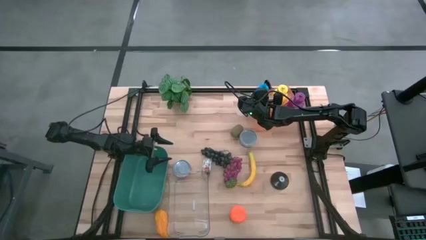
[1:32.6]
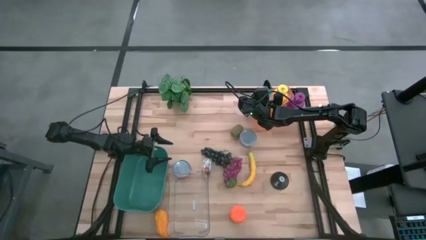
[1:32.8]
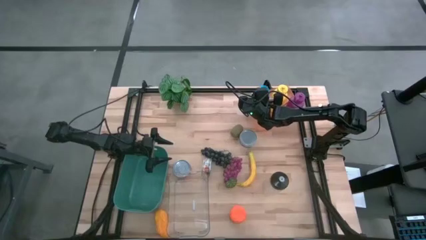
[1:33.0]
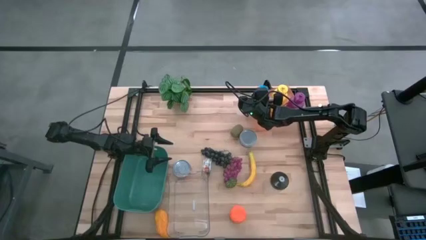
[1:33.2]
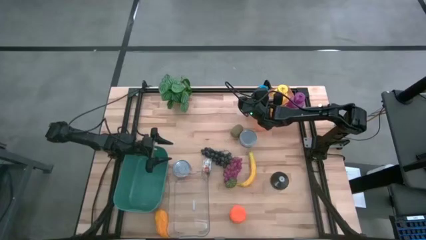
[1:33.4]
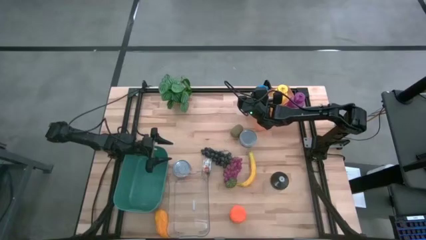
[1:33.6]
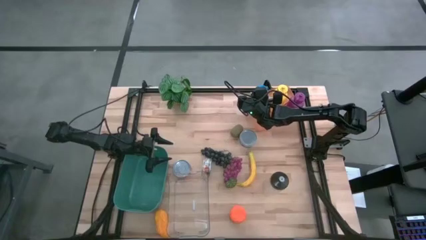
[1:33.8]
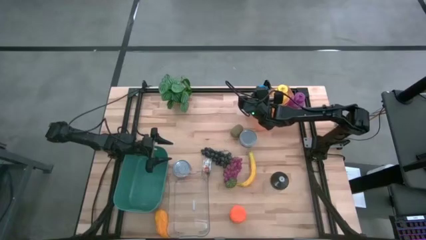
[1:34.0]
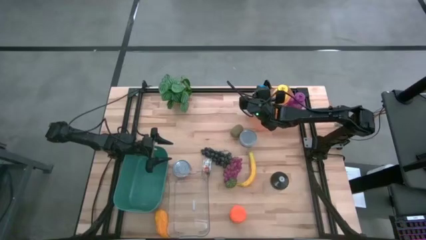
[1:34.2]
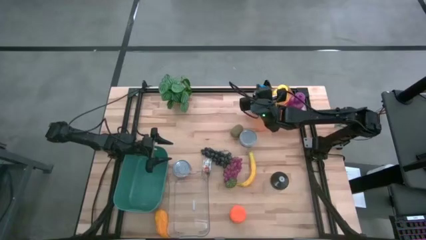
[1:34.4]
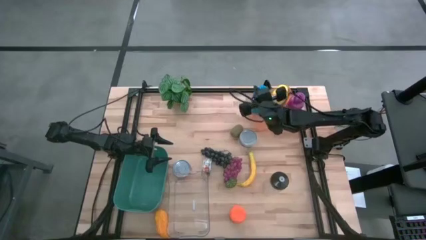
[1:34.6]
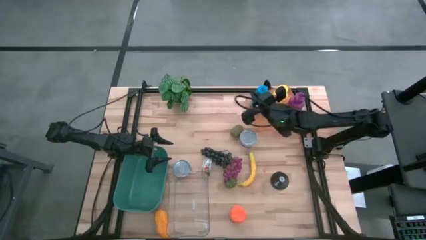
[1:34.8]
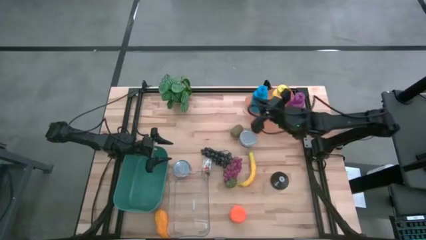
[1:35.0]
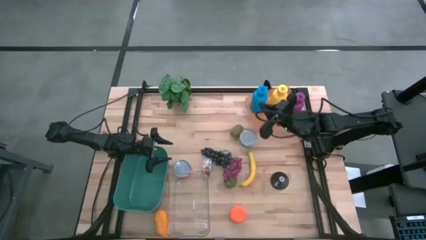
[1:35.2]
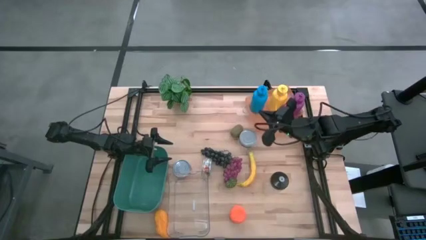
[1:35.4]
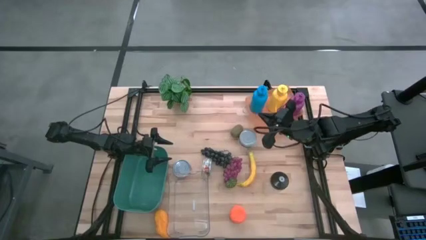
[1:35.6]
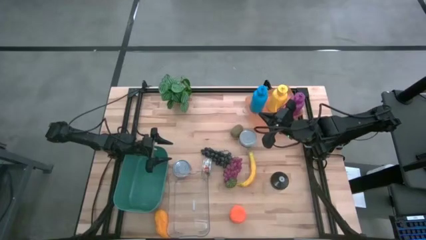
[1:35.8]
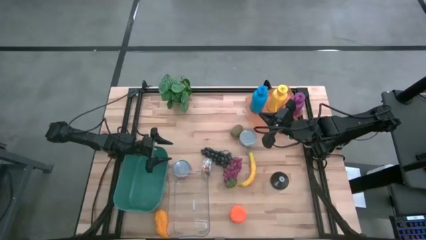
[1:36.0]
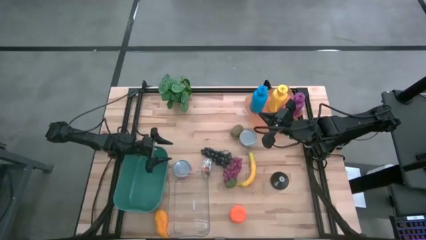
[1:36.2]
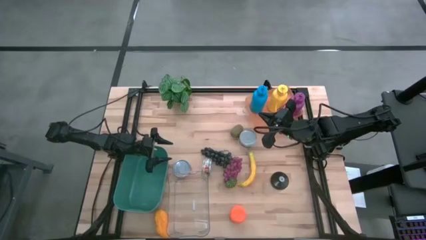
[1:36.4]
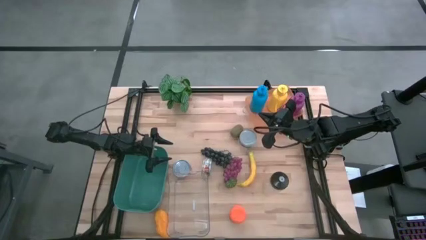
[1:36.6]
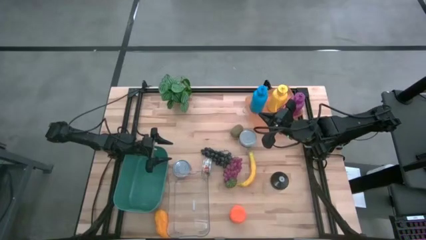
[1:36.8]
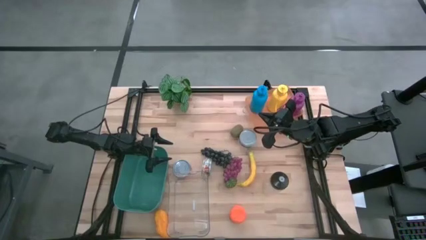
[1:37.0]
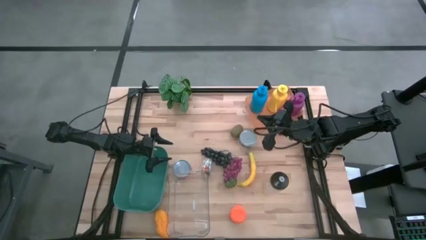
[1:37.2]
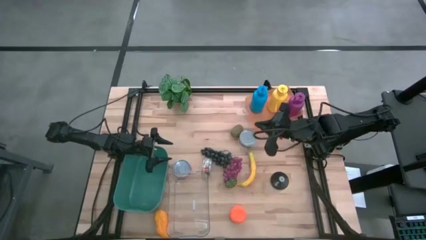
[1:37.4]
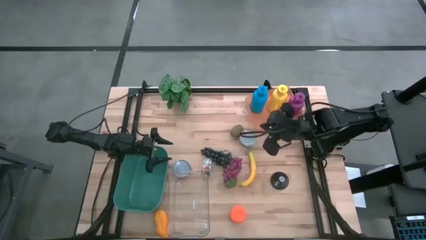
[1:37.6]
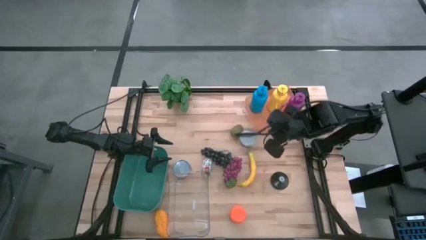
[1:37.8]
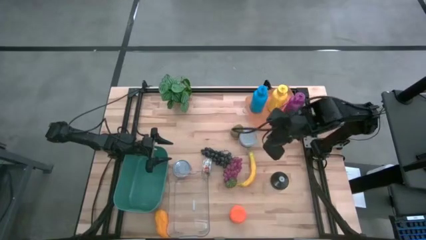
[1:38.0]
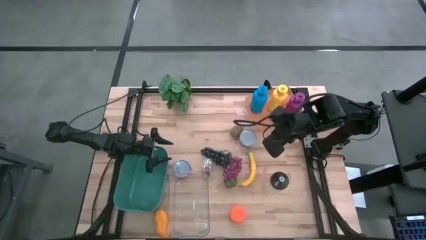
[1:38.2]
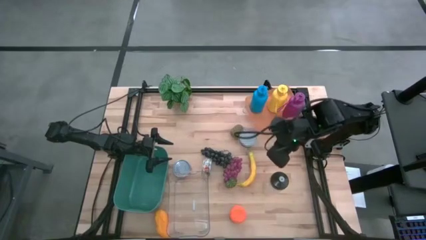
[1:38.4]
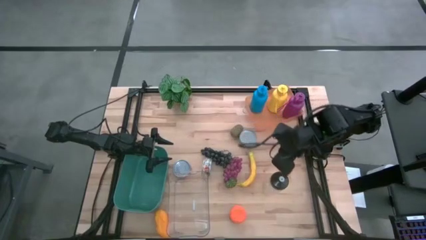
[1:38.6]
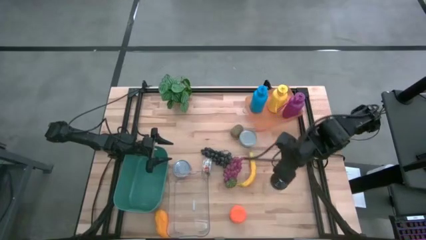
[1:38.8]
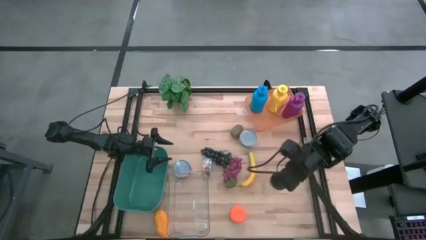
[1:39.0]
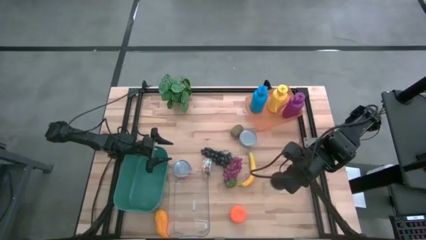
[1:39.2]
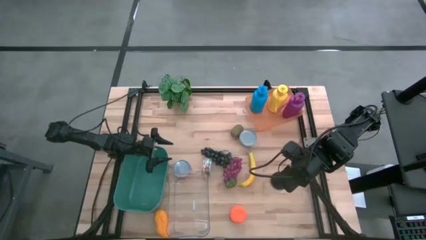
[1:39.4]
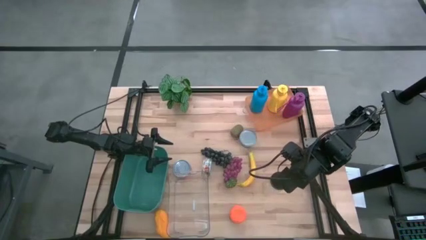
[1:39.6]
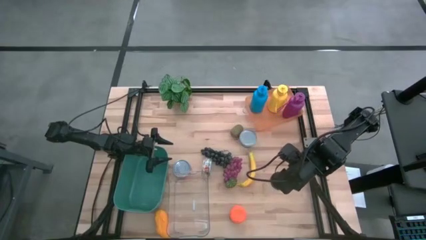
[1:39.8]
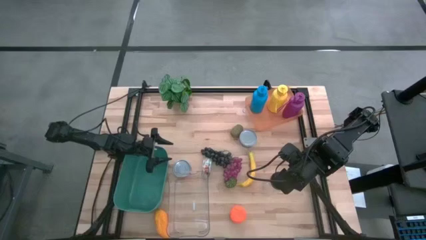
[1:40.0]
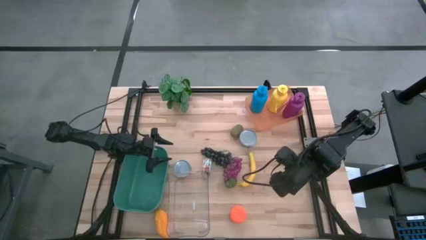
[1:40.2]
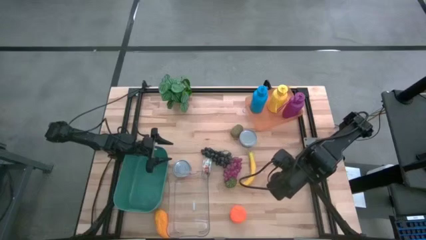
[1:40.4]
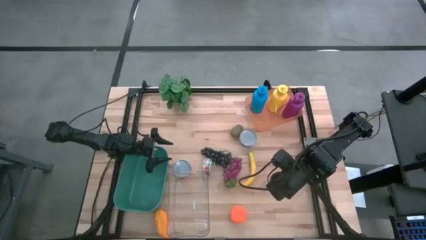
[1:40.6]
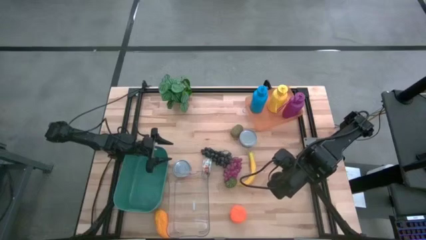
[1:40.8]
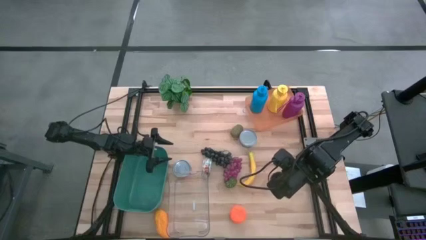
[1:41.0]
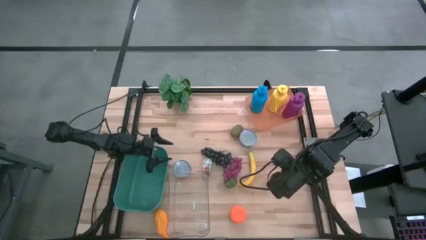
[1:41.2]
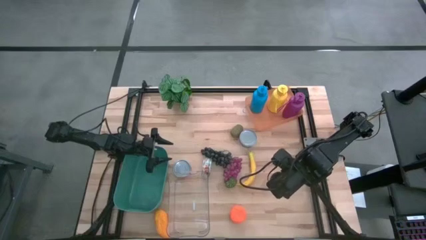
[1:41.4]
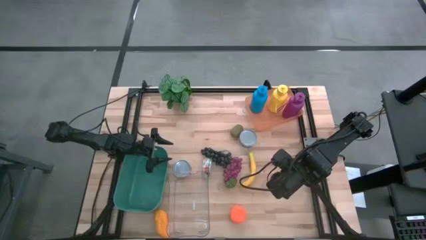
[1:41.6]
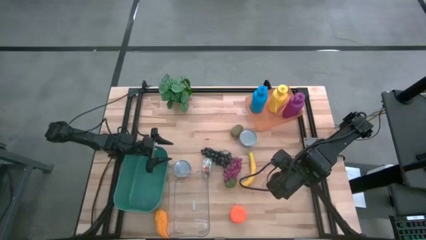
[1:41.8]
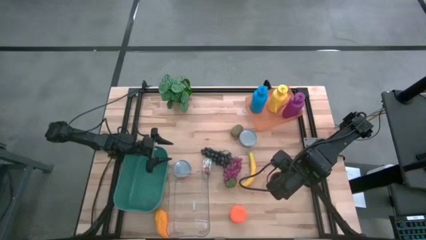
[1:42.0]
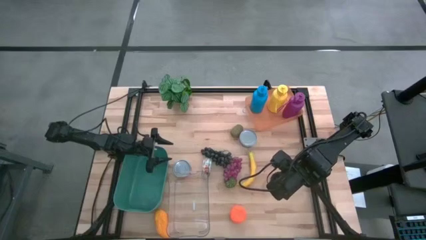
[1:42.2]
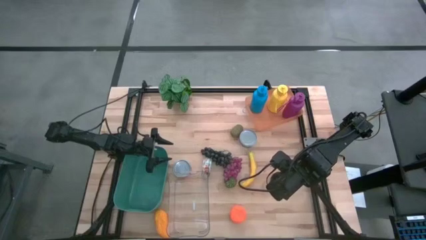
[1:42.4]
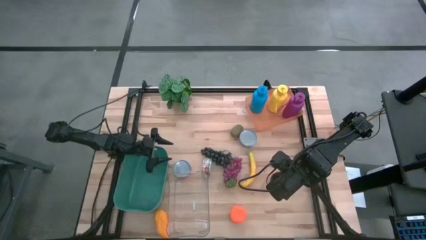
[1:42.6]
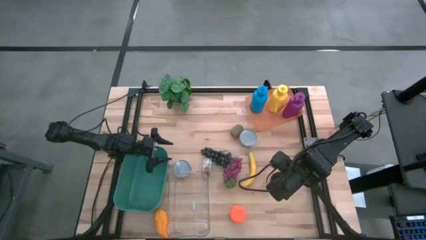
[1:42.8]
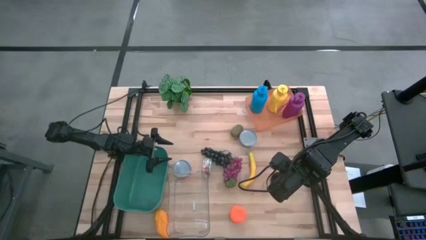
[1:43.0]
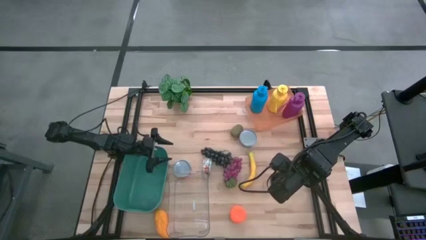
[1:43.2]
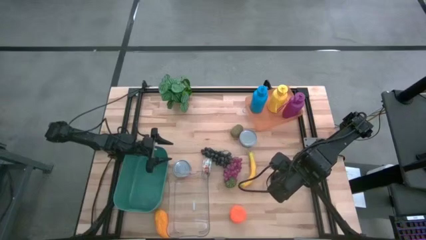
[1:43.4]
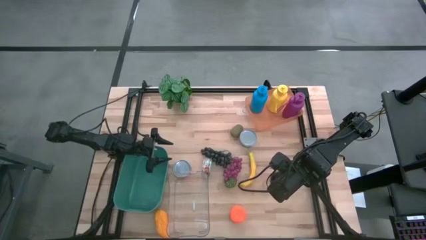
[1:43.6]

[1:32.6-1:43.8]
Task: Pick & Place Food Item
Put the transparent tumbler into the orange bin

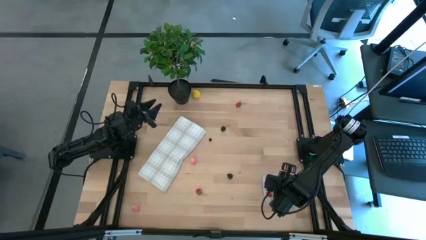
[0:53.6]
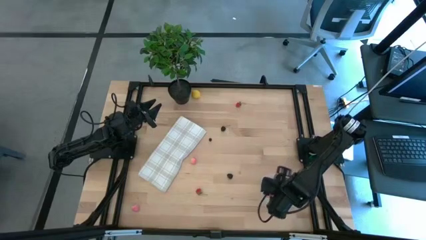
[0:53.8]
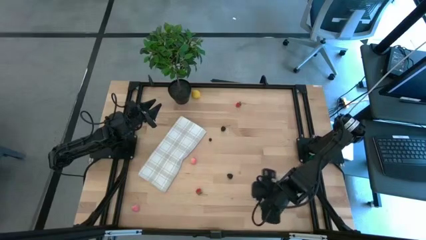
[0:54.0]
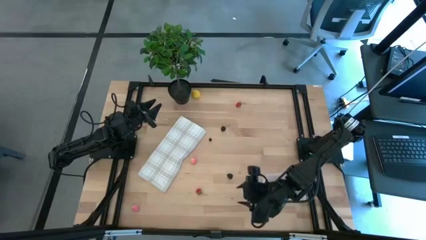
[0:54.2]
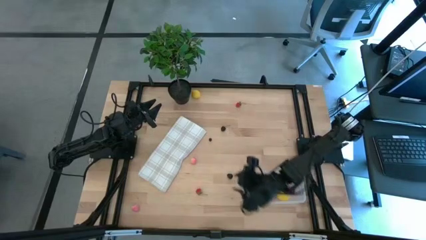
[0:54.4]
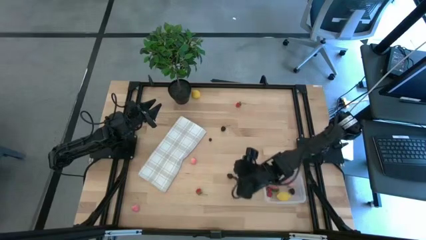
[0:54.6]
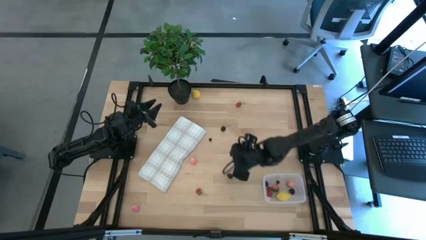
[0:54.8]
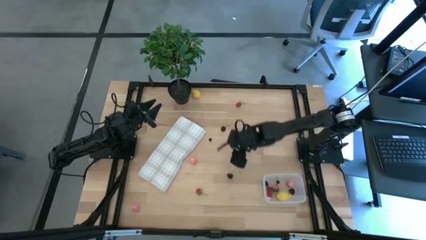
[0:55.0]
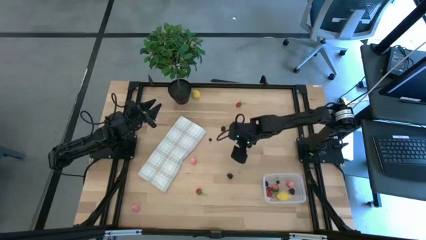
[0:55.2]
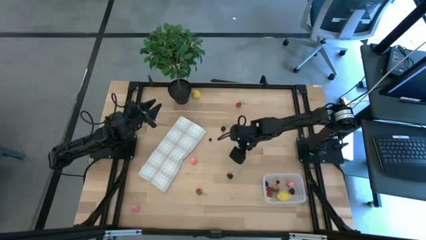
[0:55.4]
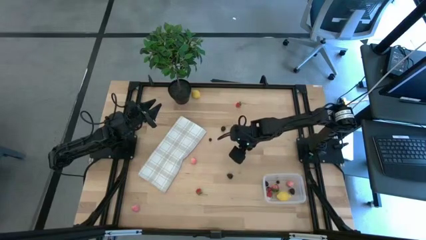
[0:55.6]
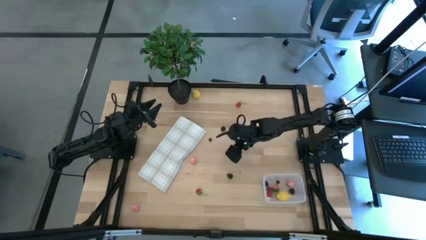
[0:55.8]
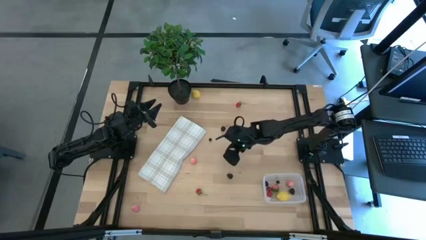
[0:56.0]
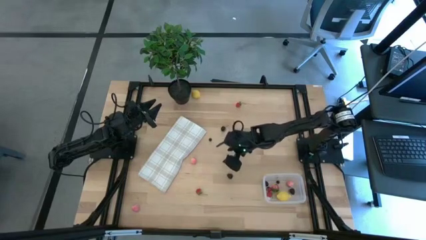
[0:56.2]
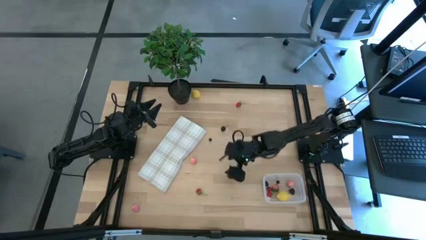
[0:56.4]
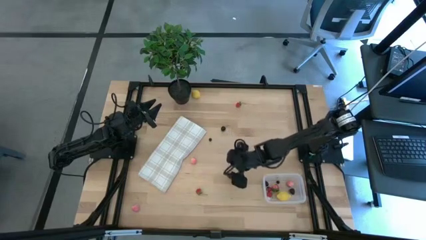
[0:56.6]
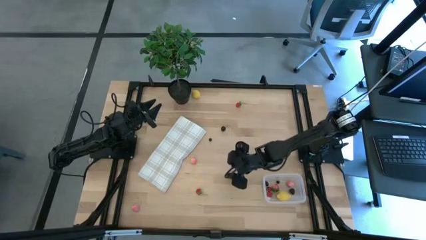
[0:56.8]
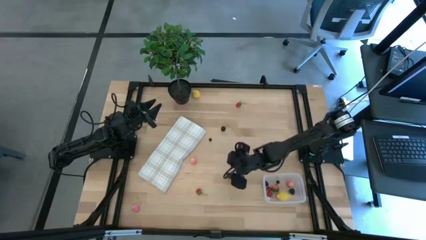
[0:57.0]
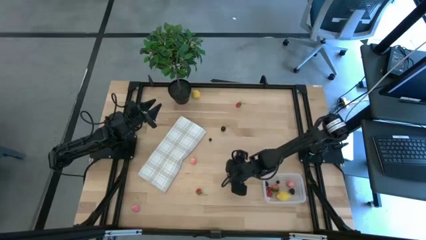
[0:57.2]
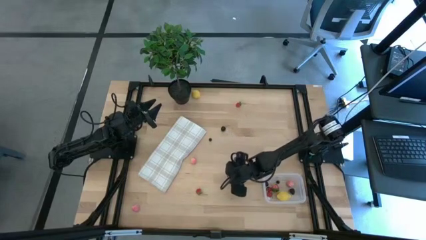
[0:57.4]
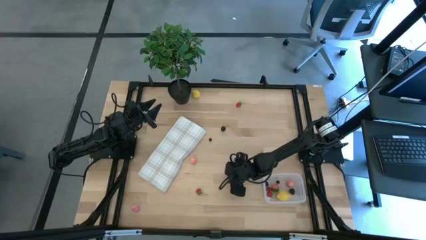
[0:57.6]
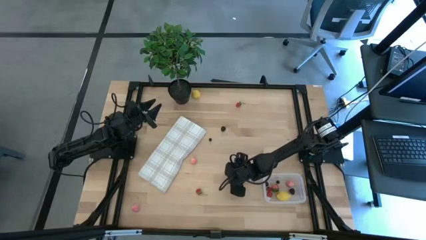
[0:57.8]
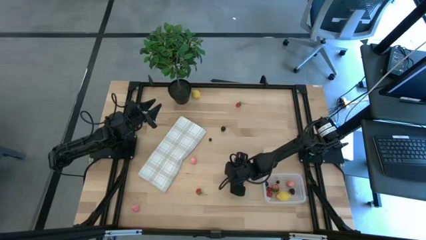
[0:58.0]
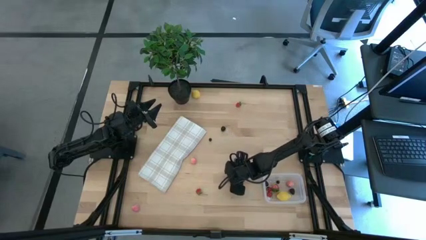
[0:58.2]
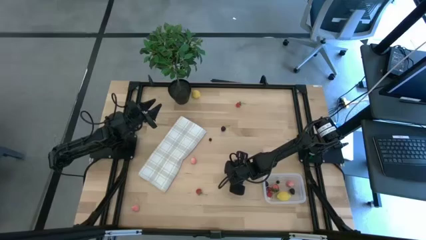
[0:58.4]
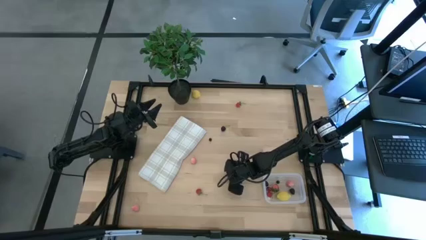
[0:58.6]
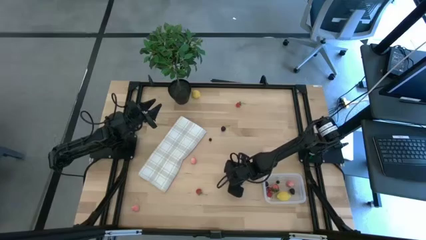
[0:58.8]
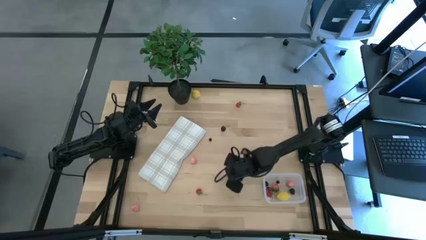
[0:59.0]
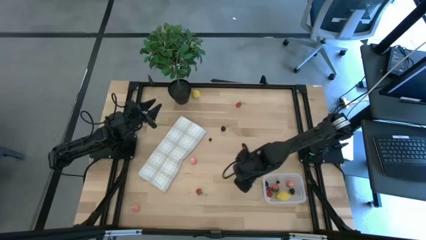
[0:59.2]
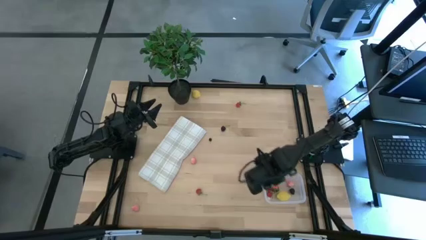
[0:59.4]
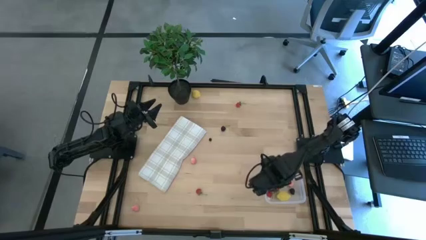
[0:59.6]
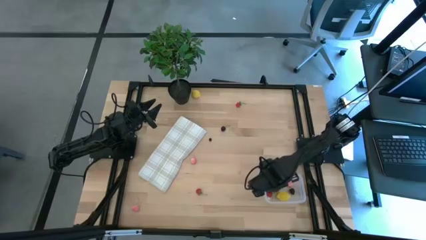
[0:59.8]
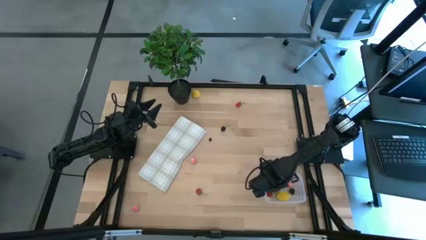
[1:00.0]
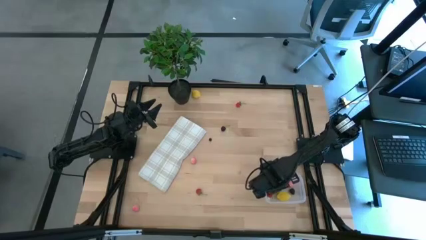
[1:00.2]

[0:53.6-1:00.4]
Task: Pick and placing Produce into tupperware
Put the black raspberry into the transparent bin
